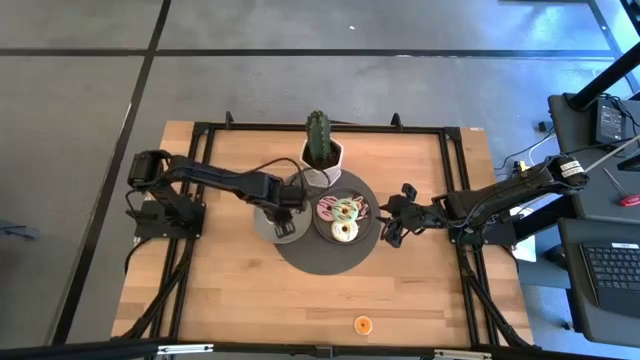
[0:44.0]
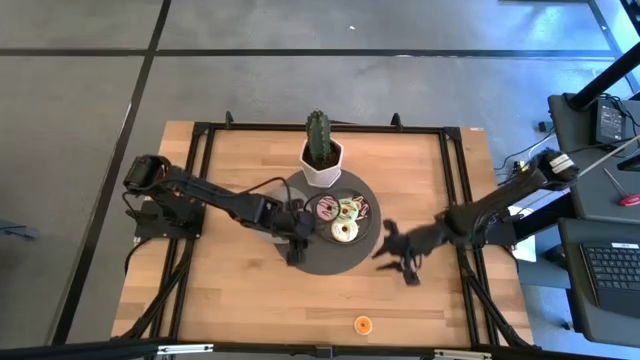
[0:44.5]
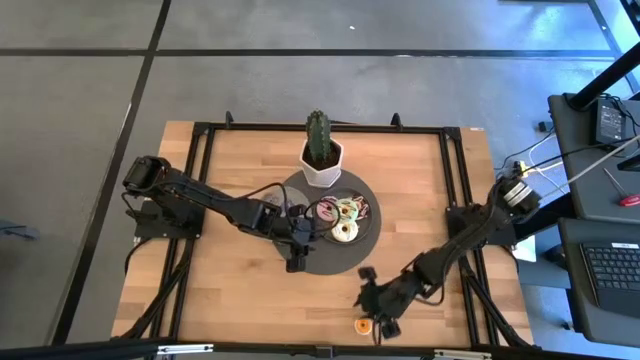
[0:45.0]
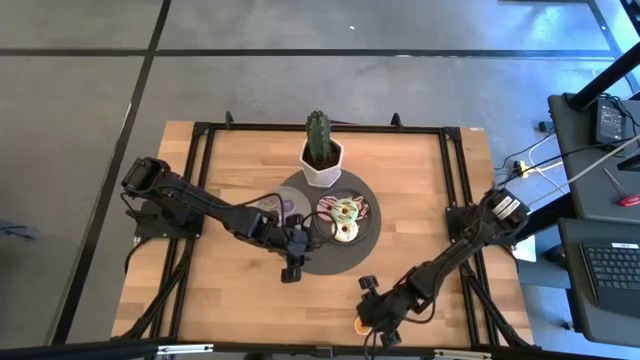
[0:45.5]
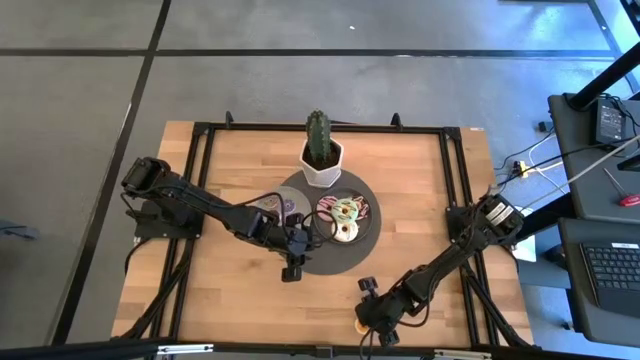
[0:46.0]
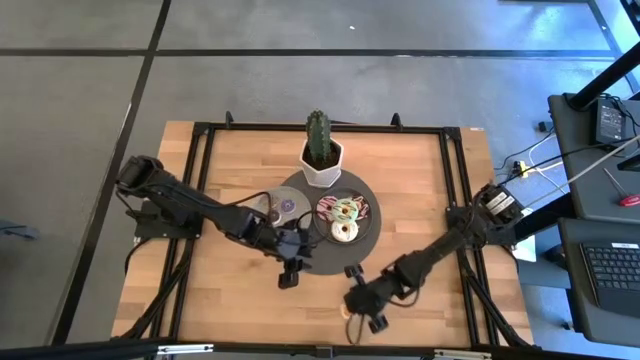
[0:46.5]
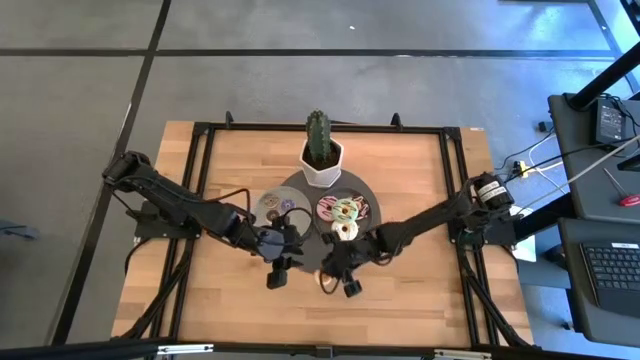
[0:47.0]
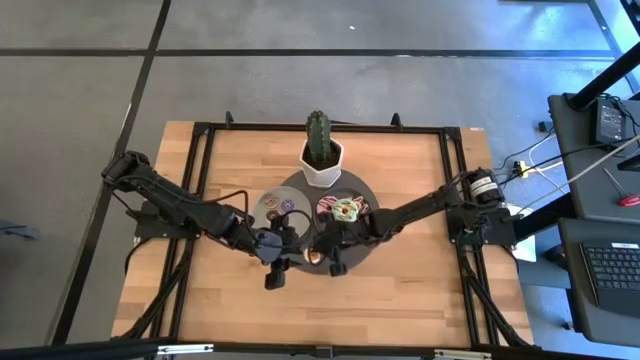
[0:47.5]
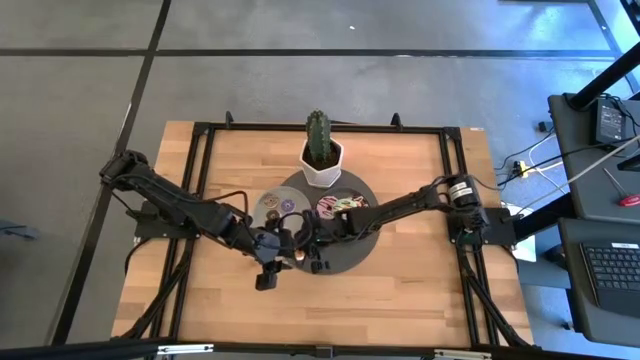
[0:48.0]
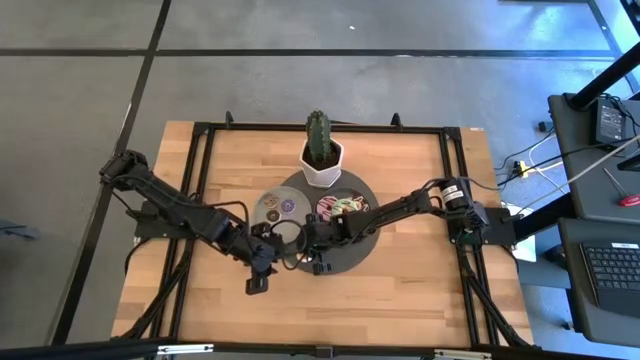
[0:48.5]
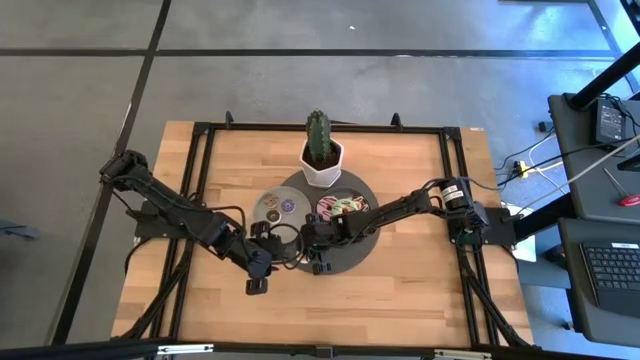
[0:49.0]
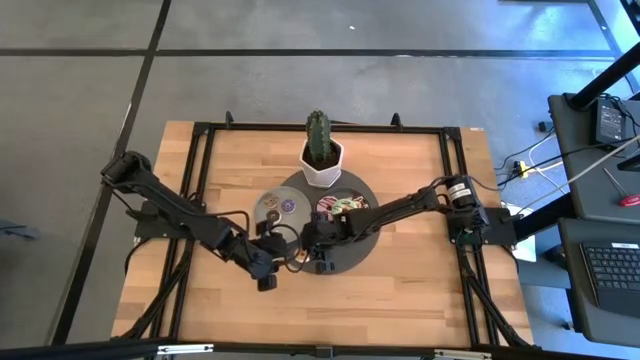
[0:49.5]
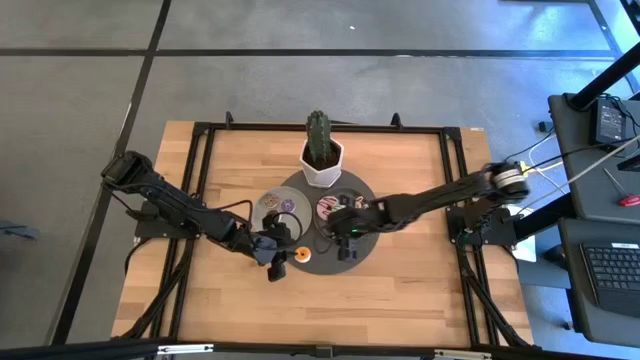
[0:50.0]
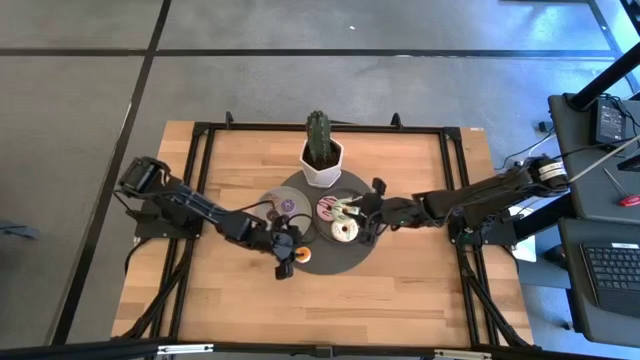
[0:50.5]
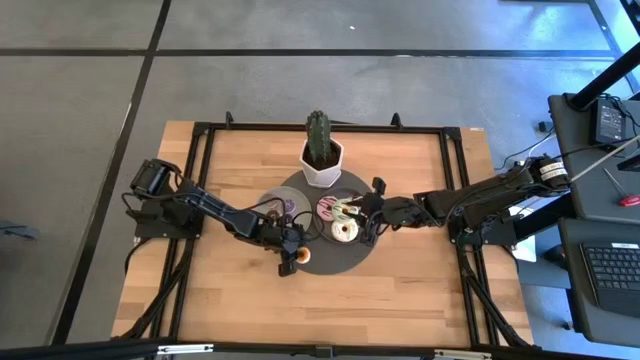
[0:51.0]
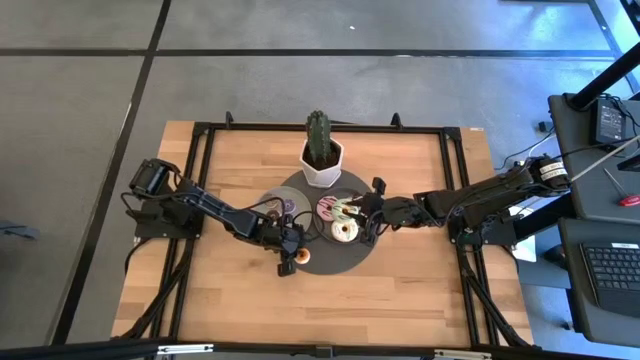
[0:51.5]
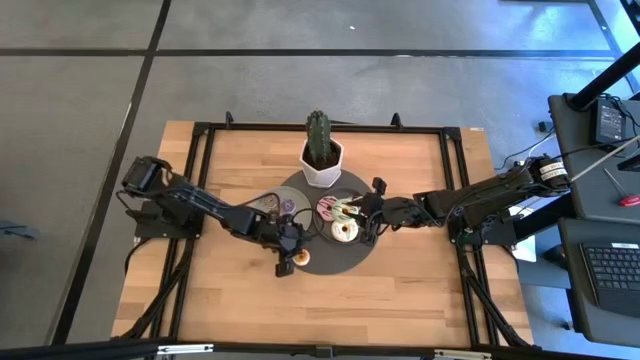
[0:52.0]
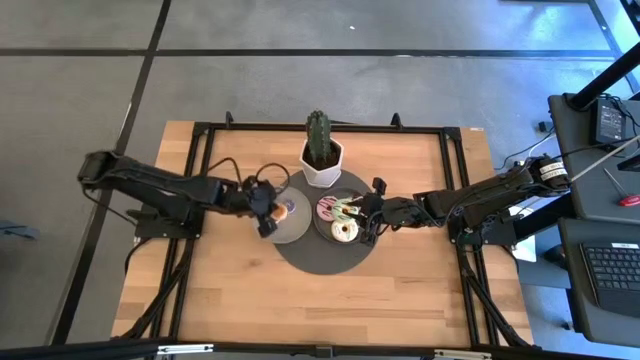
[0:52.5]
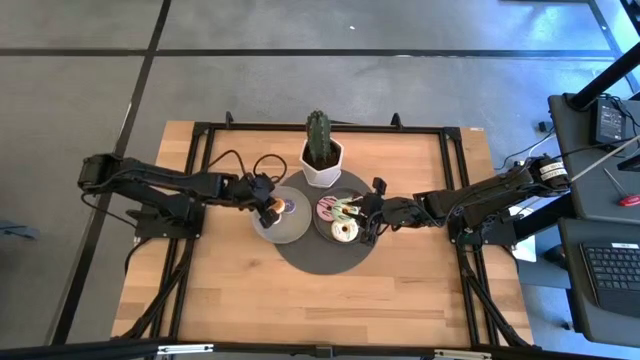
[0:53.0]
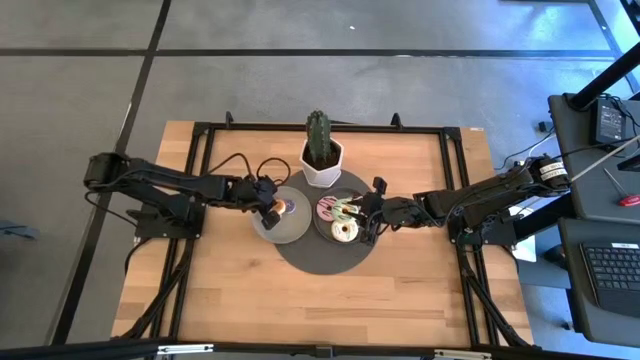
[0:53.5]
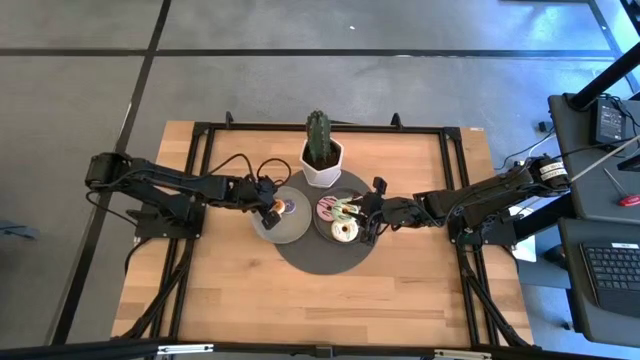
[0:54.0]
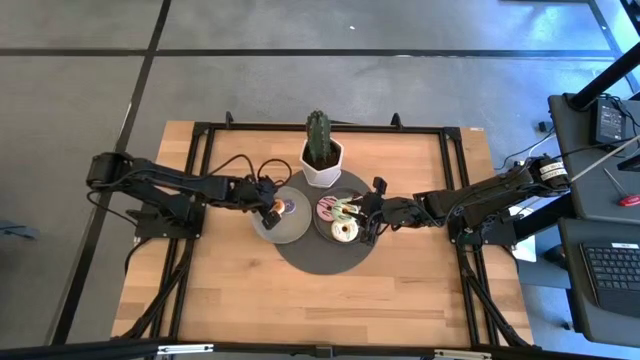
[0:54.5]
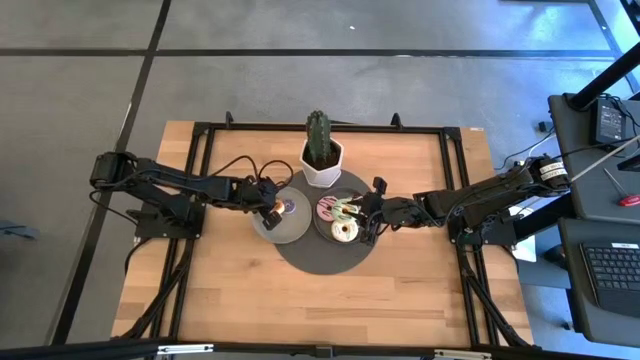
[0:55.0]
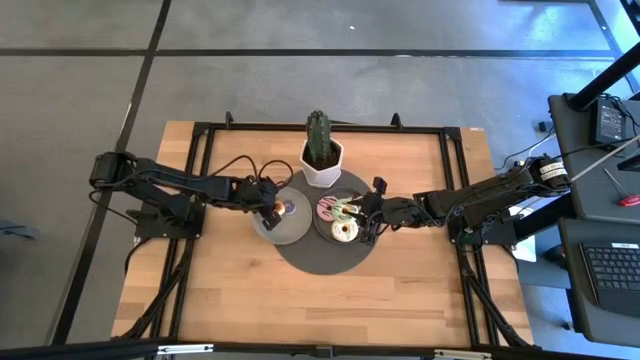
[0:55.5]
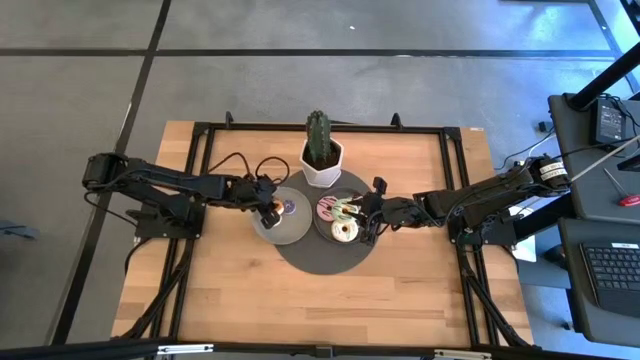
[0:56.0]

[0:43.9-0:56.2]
Task: Pick & Place donuts
Put the small orange donut on the light gray plate

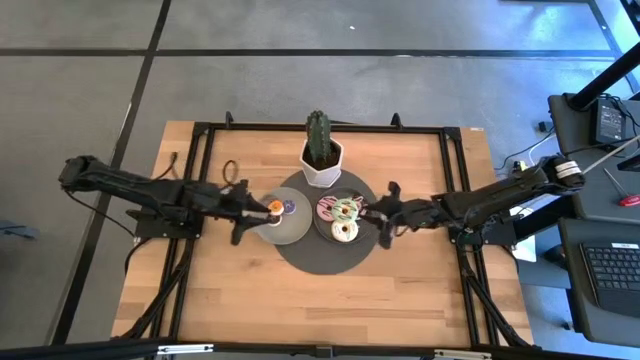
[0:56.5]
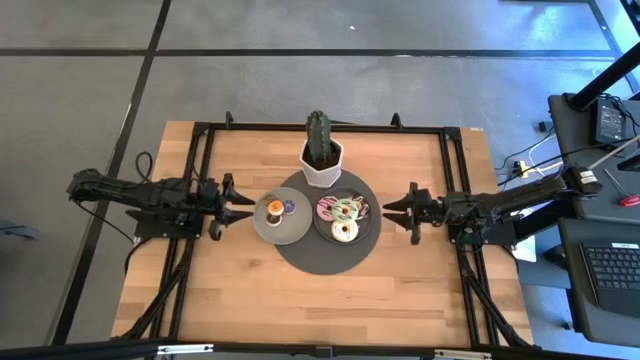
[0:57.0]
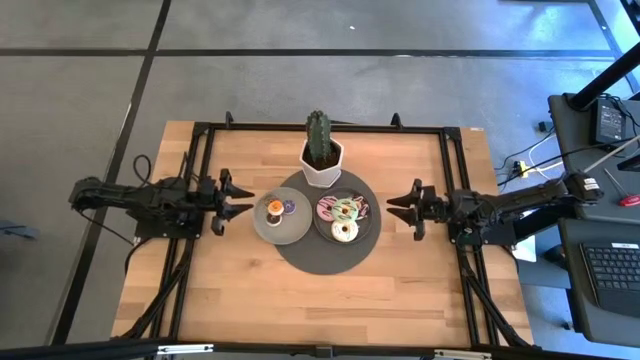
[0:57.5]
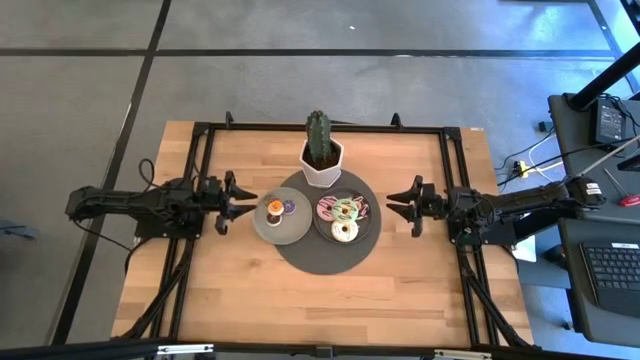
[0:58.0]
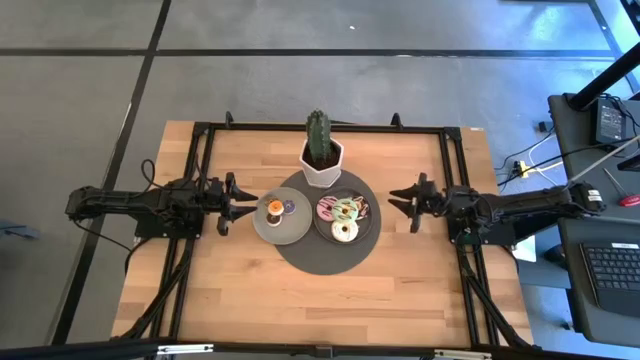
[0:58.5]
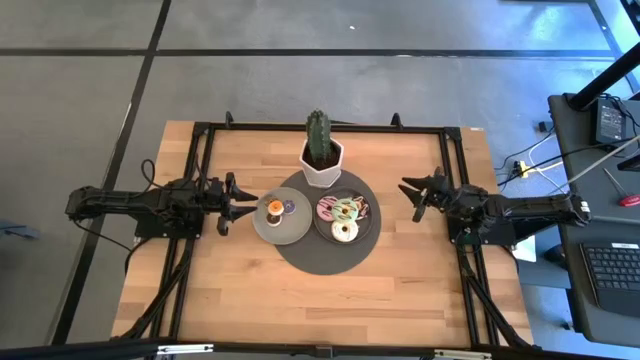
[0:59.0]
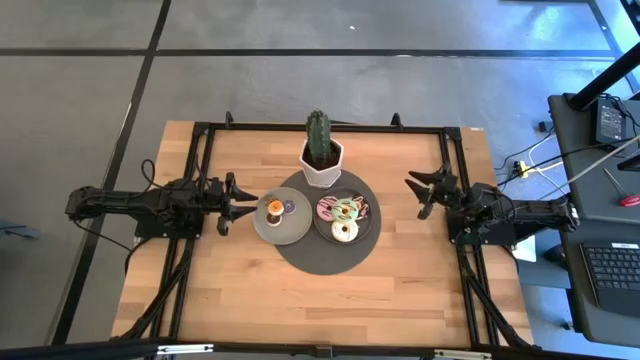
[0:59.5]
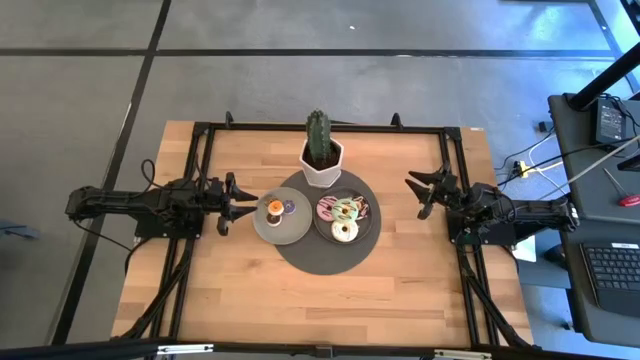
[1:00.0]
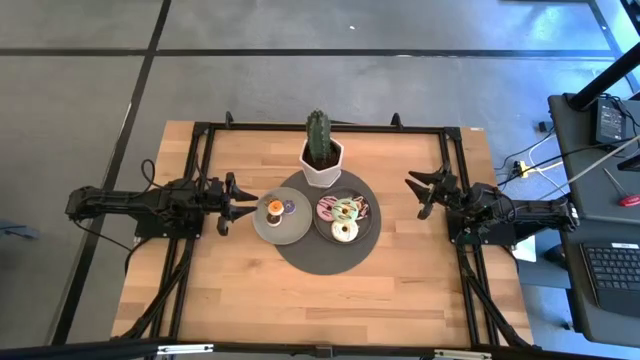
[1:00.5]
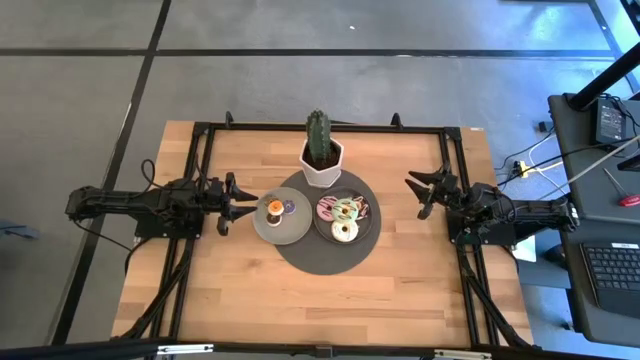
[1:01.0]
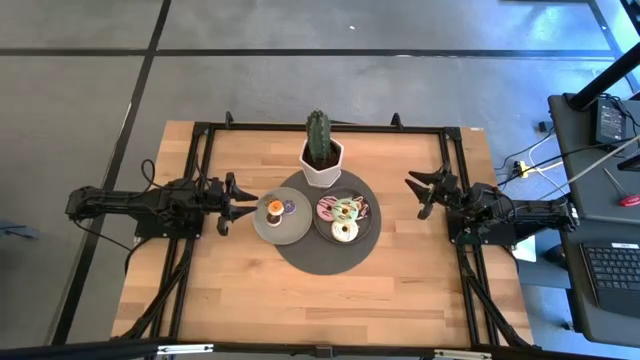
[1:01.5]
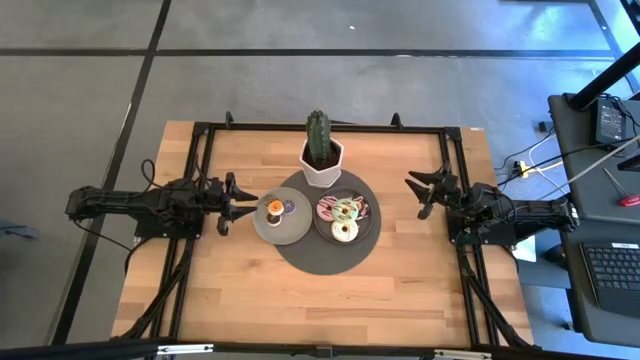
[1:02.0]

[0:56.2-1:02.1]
Return to Home Position

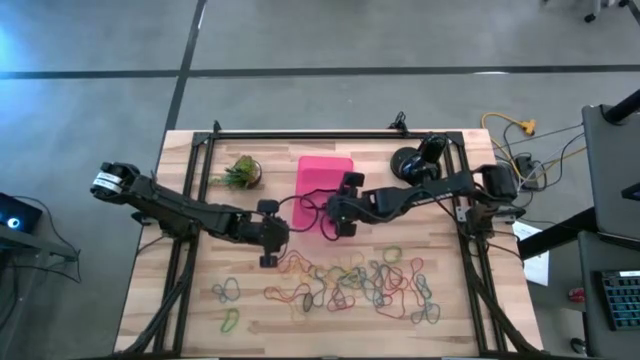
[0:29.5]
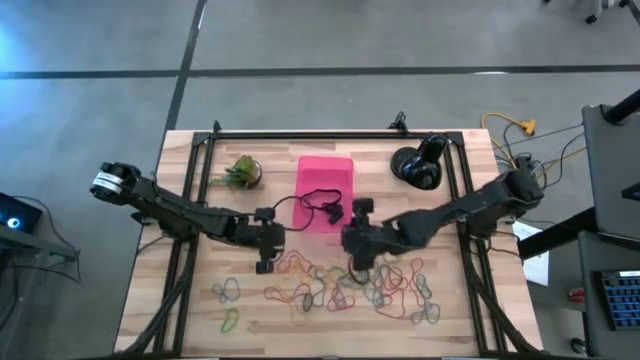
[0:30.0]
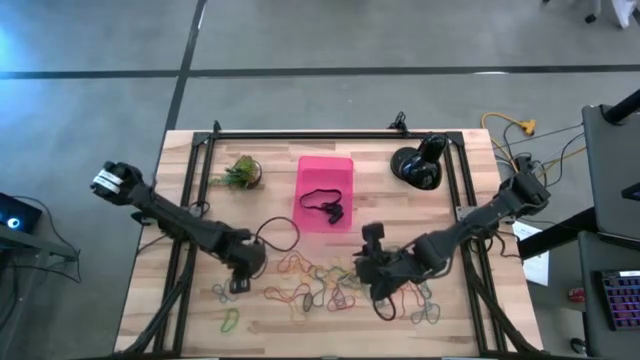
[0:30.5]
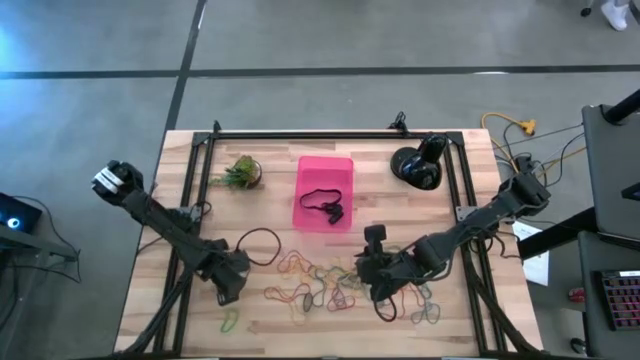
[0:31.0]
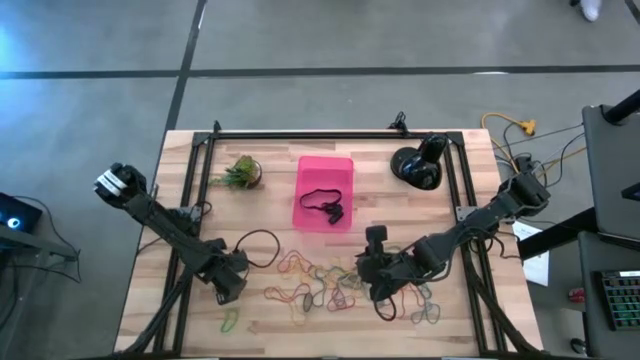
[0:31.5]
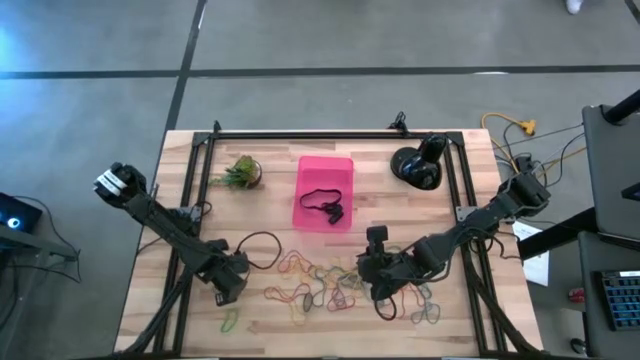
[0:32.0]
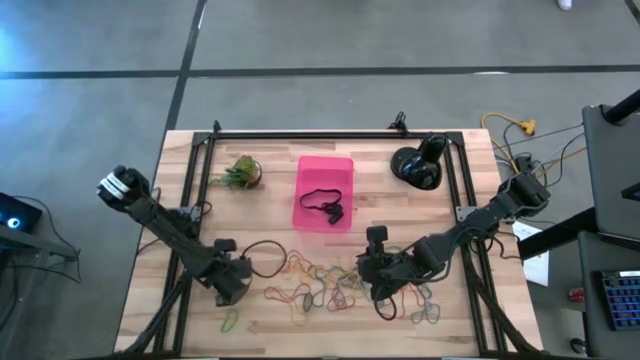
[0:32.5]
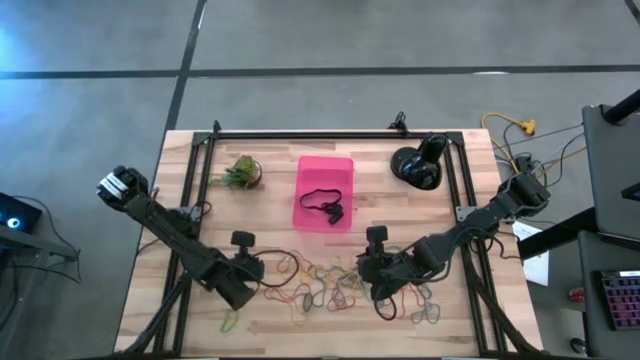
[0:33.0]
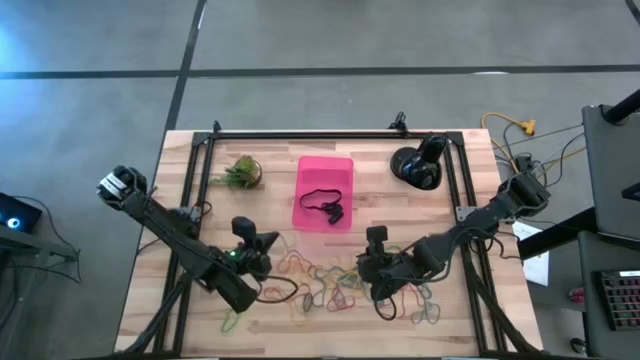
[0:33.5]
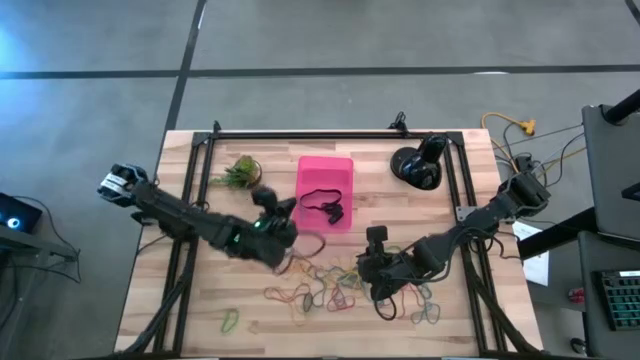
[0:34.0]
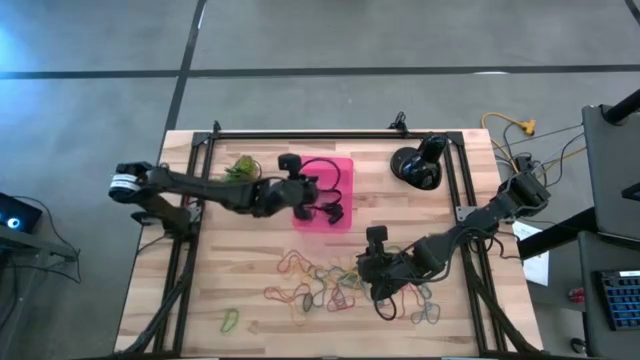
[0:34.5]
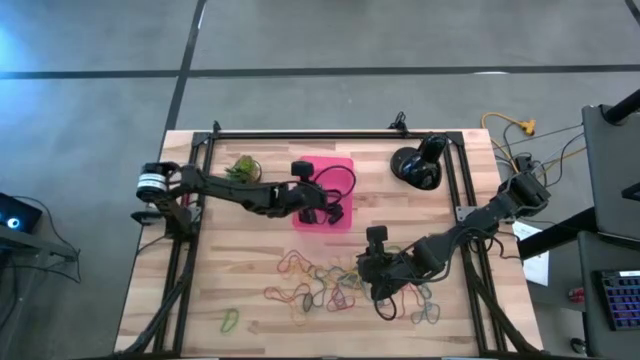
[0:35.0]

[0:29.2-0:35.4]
Task: Pick and place rubber bands into bin
Put the blue rubber bands into the pink bin
